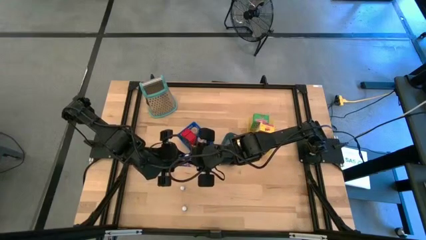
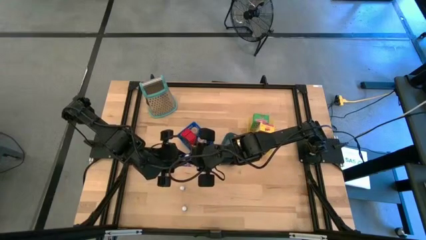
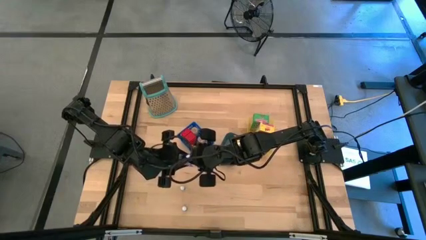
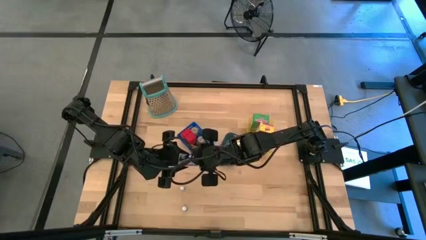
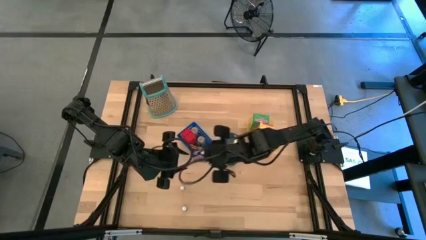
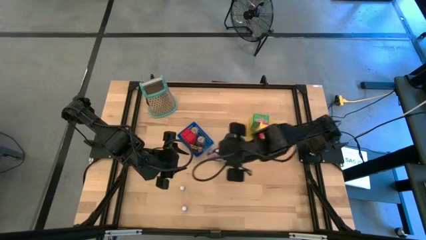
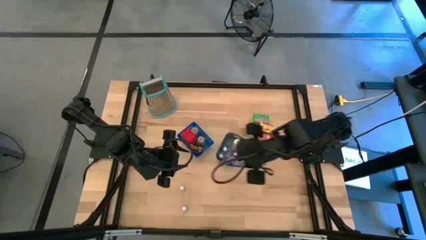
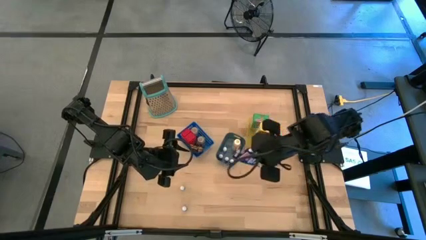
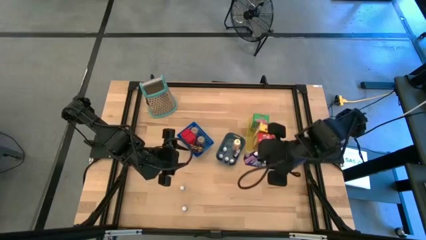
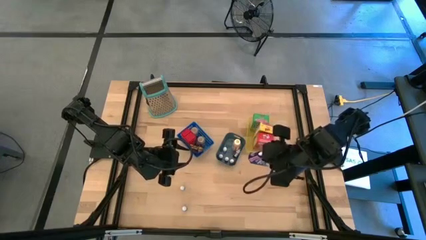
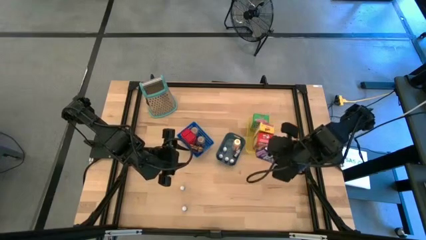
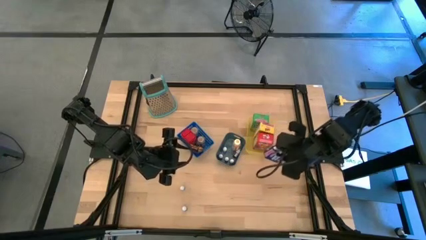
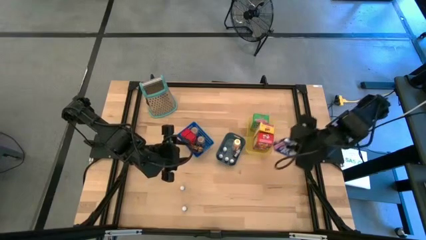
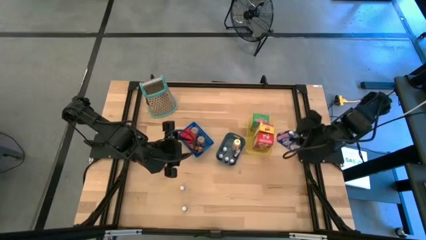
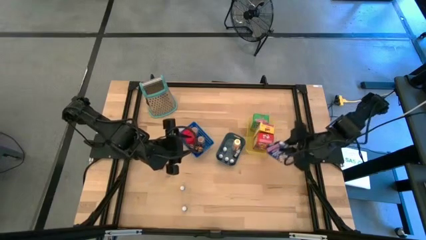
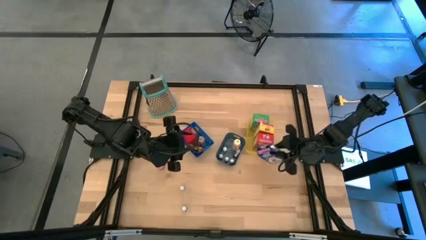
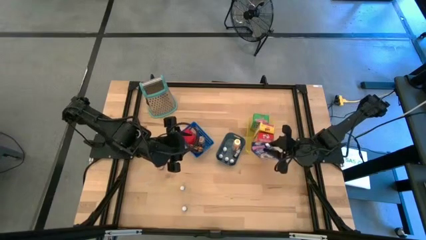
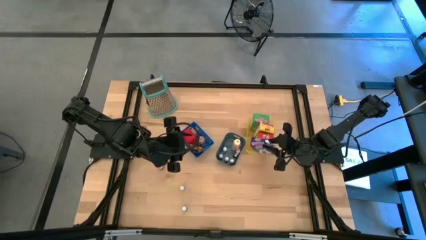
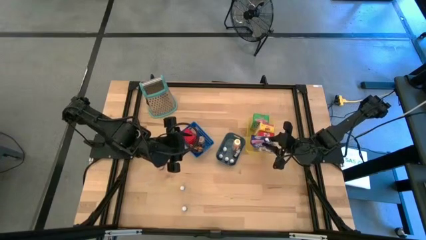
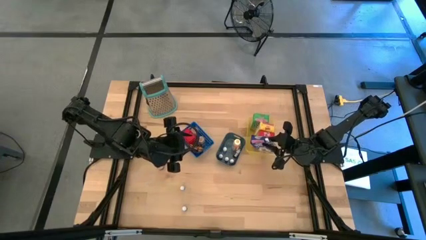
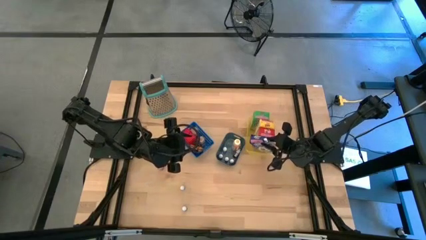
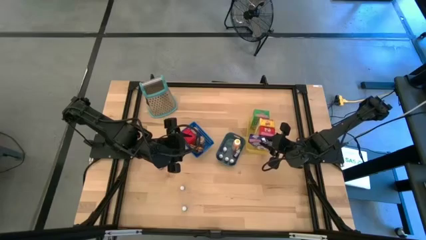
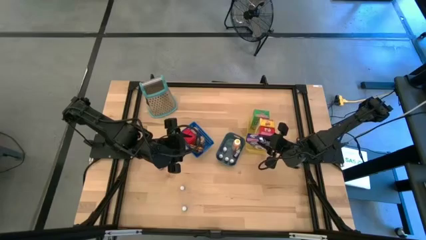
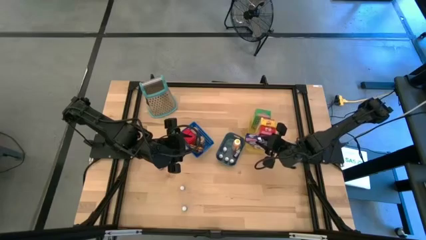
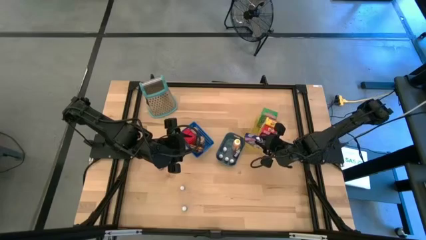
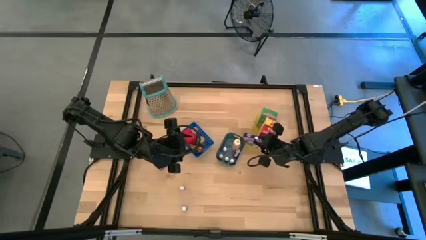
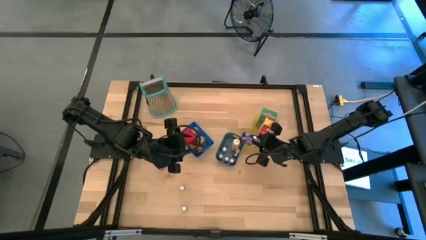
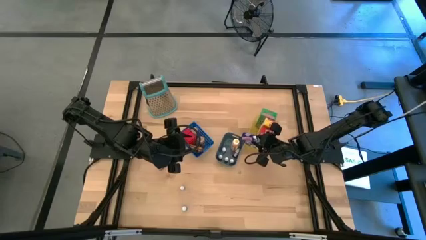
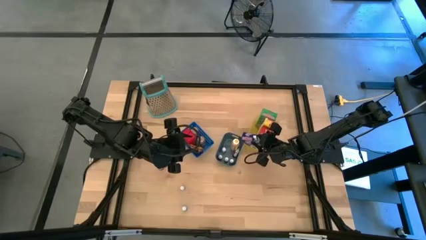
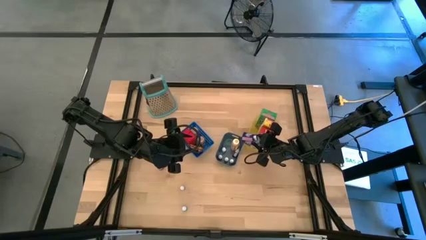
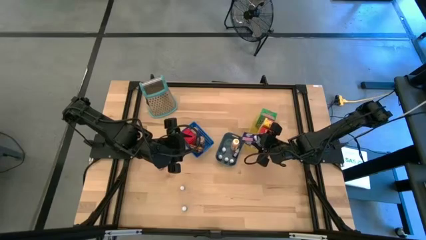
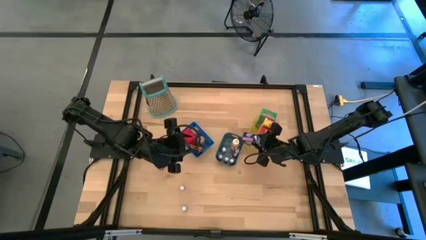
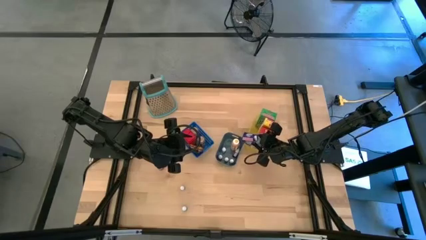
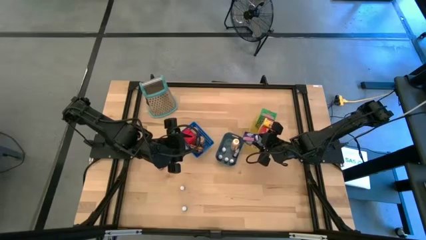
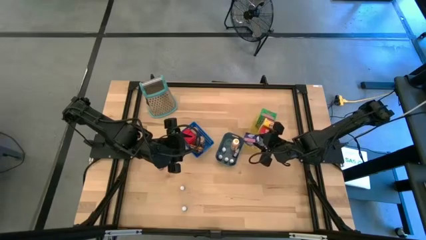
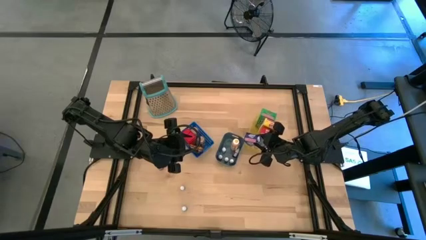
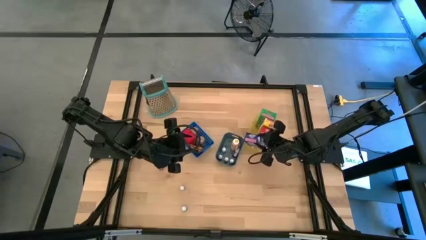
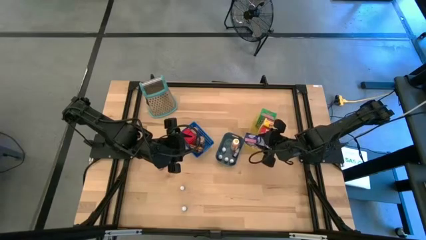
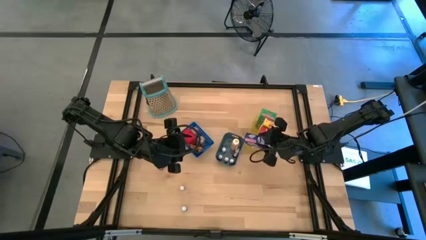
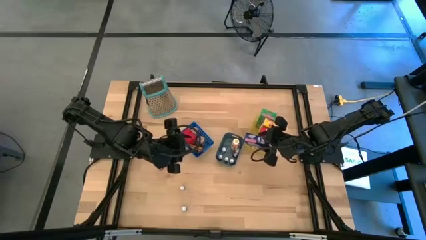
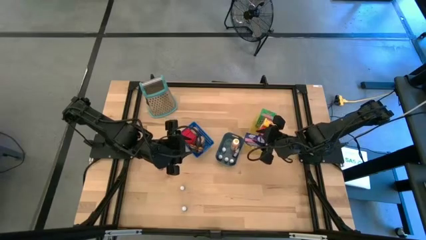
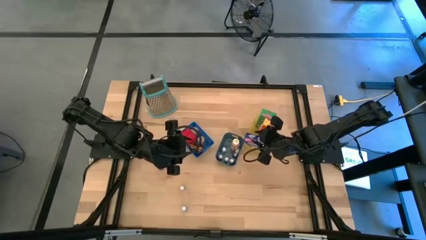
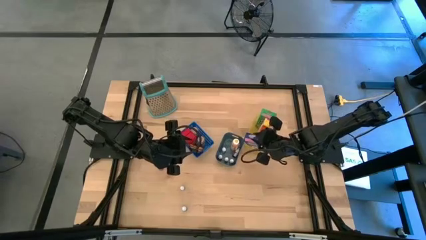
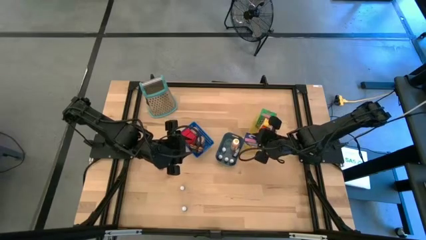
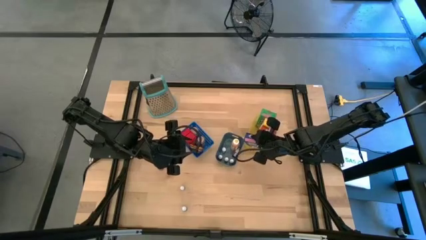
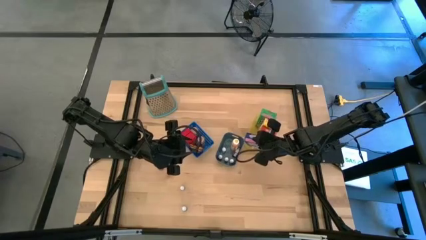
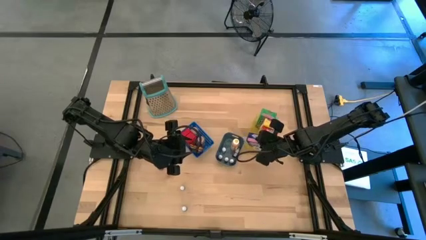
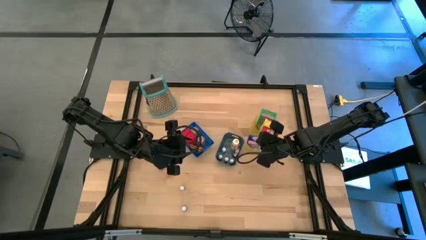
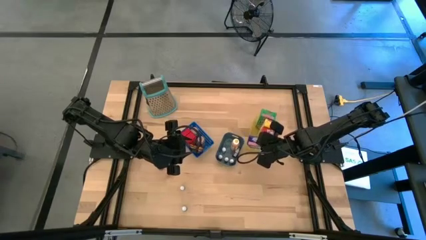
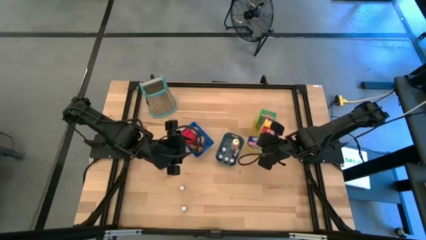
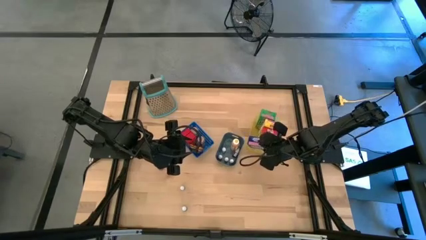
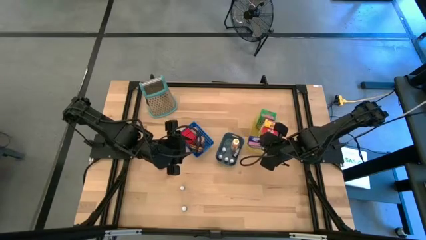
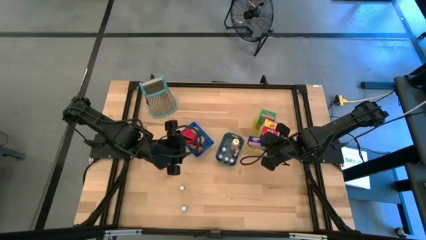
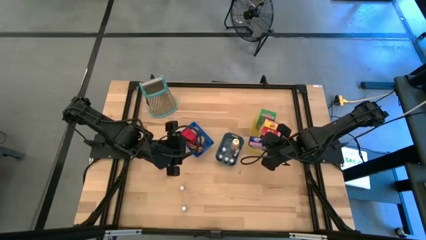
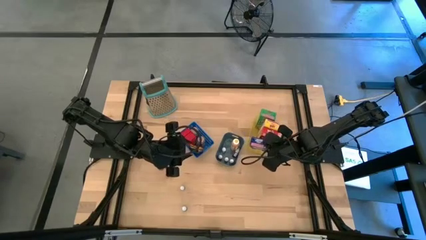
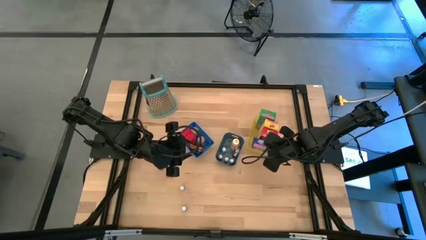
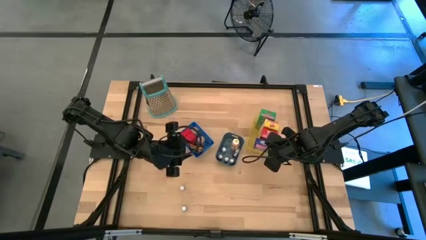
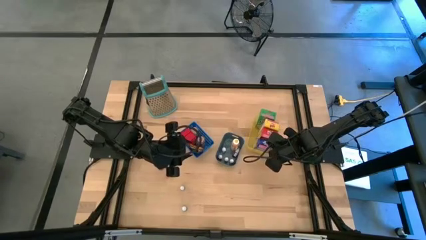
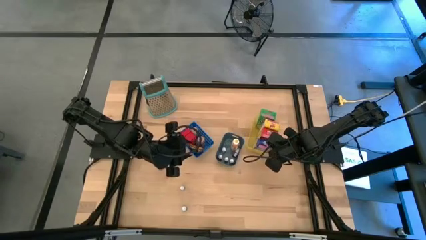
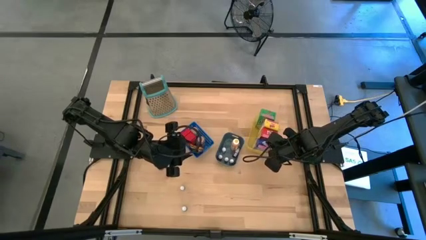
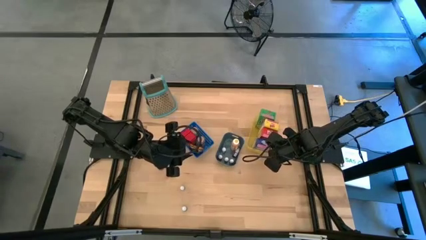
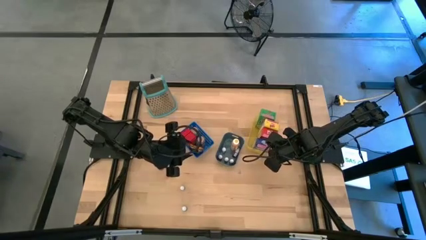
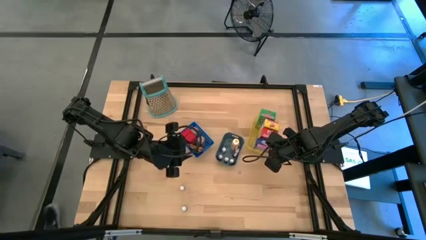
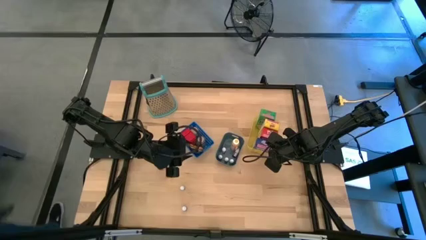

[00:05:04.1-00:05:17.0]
Task: Pick & Place Kitchen Items
Put the blue cereal box into the yellow bin
